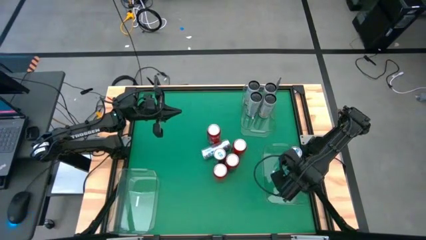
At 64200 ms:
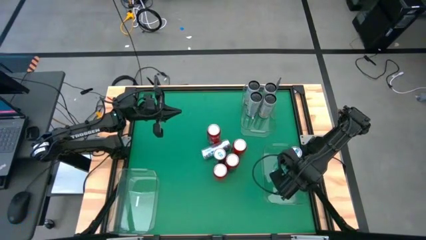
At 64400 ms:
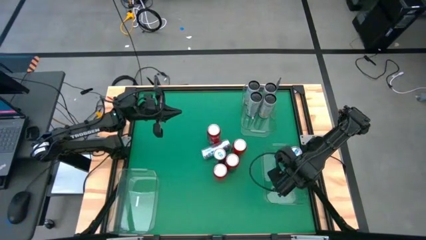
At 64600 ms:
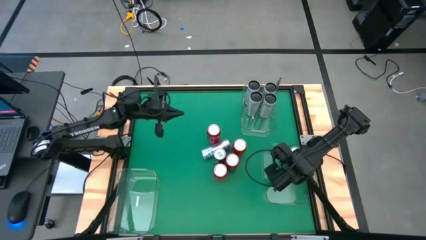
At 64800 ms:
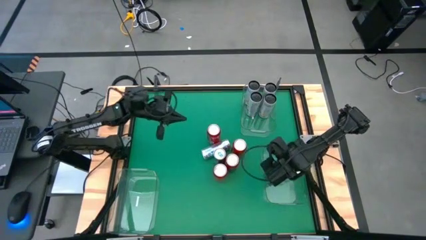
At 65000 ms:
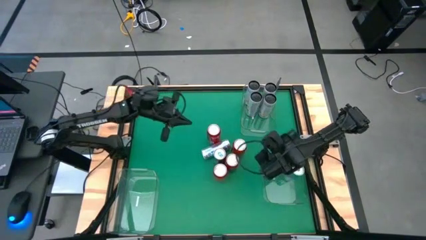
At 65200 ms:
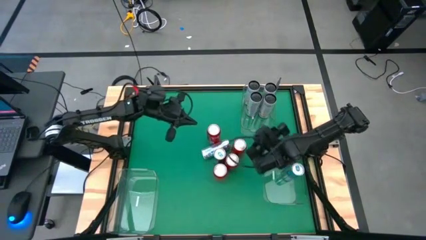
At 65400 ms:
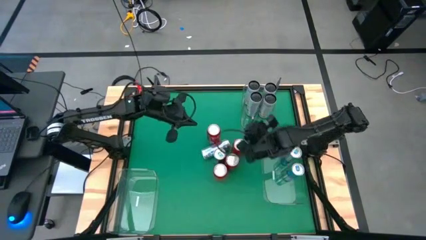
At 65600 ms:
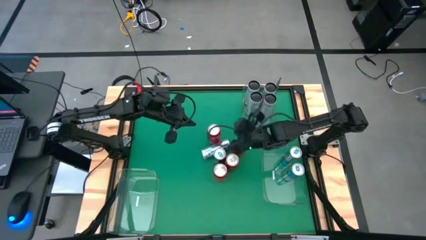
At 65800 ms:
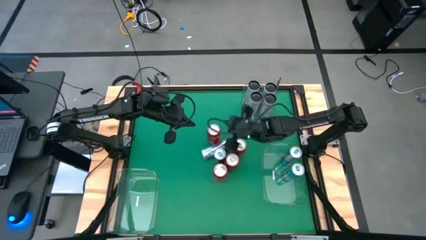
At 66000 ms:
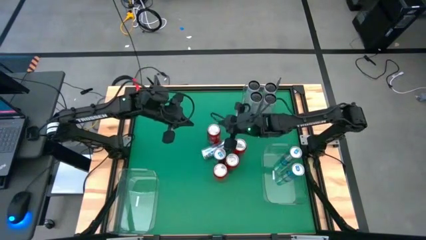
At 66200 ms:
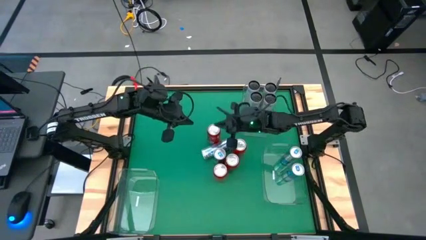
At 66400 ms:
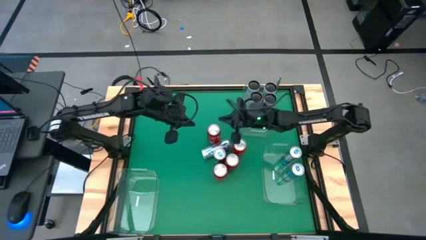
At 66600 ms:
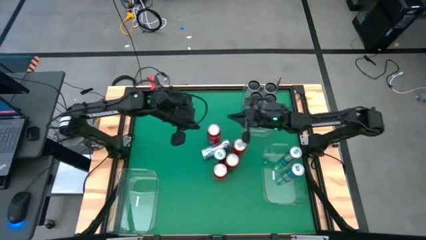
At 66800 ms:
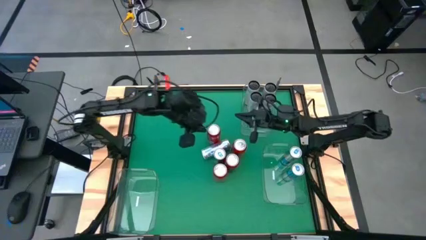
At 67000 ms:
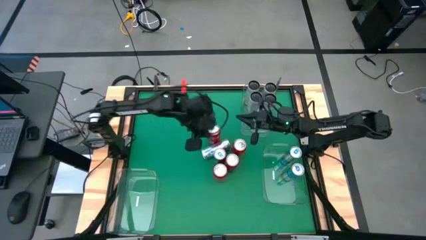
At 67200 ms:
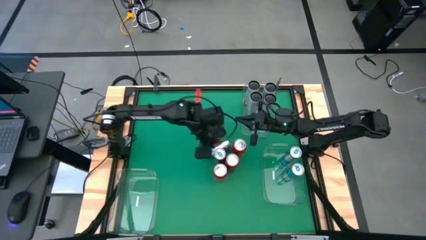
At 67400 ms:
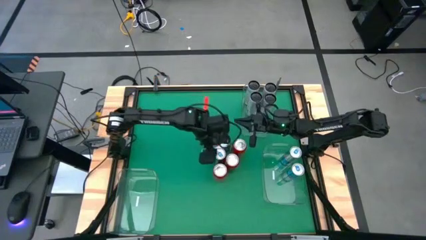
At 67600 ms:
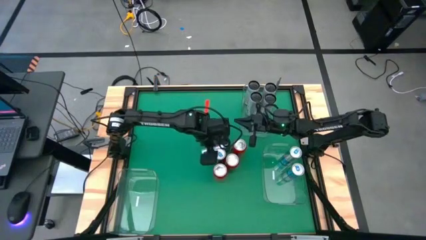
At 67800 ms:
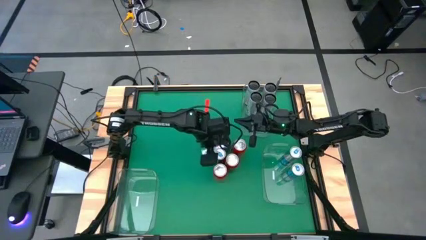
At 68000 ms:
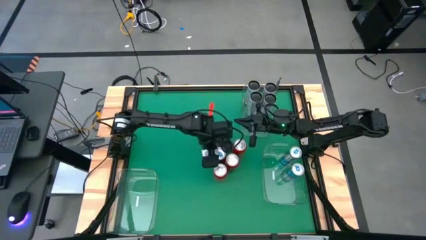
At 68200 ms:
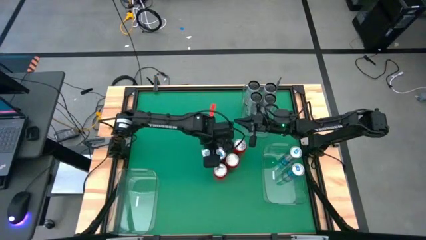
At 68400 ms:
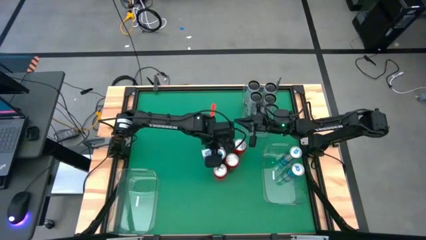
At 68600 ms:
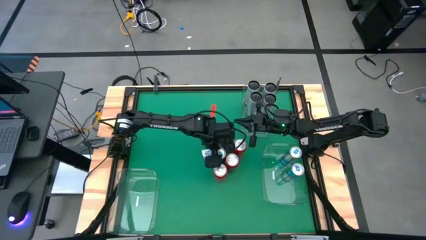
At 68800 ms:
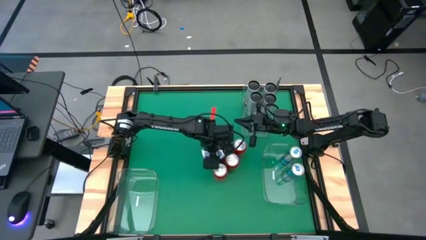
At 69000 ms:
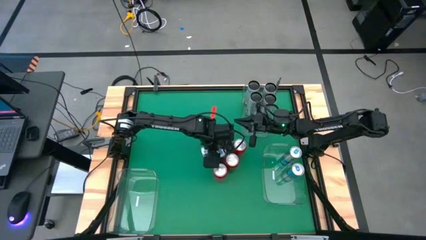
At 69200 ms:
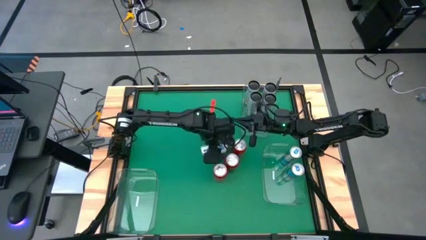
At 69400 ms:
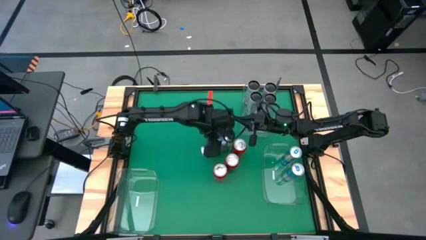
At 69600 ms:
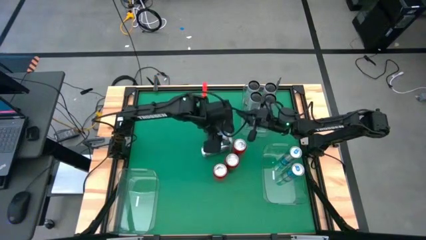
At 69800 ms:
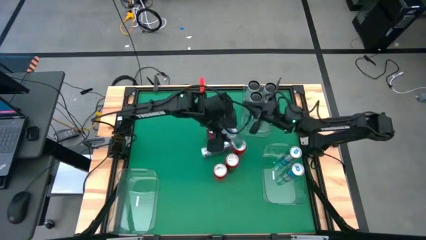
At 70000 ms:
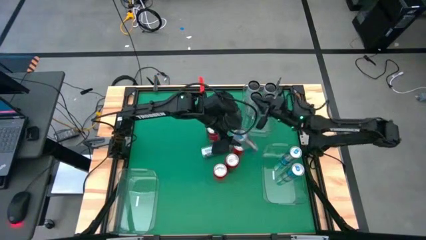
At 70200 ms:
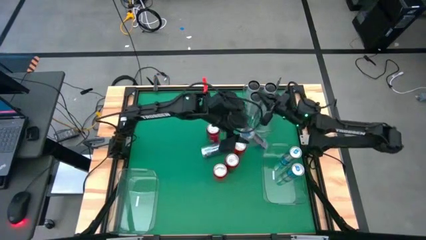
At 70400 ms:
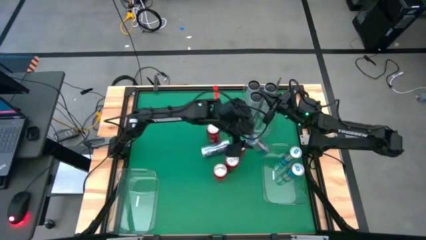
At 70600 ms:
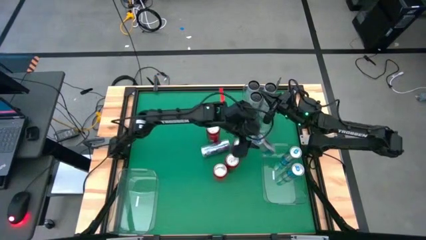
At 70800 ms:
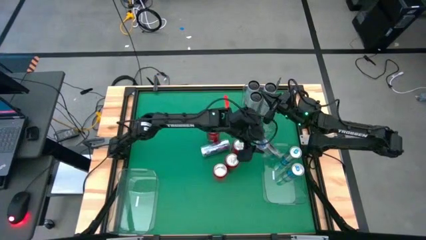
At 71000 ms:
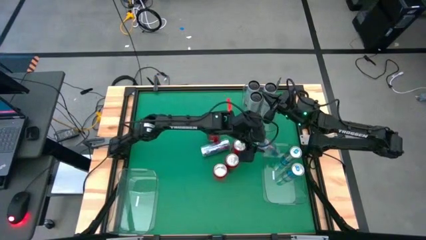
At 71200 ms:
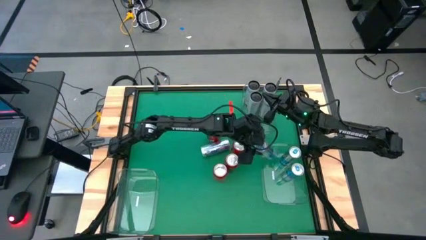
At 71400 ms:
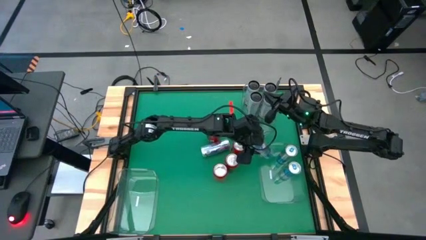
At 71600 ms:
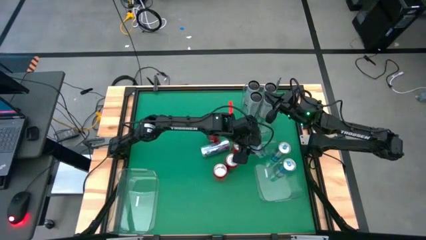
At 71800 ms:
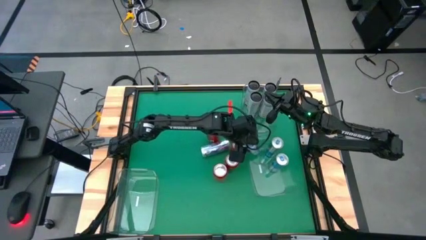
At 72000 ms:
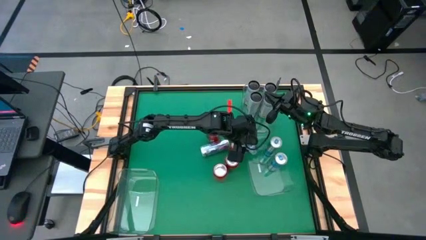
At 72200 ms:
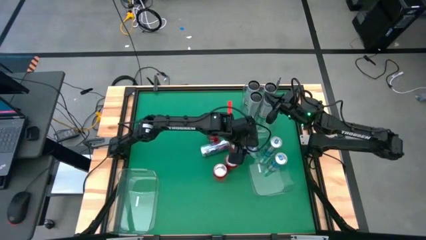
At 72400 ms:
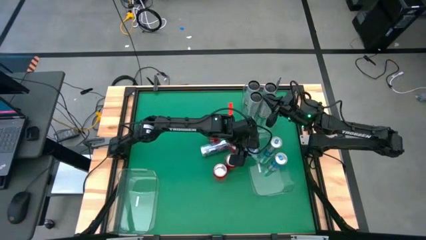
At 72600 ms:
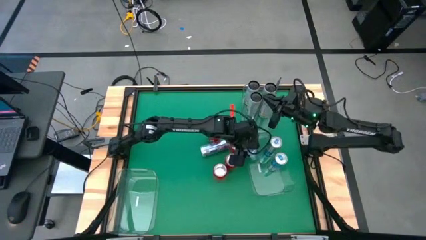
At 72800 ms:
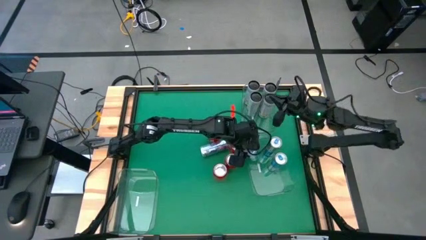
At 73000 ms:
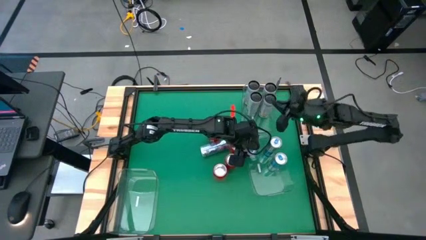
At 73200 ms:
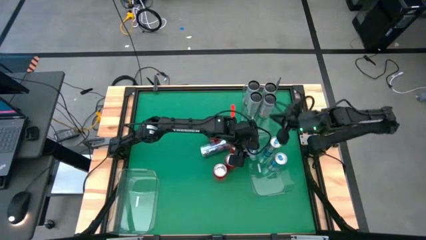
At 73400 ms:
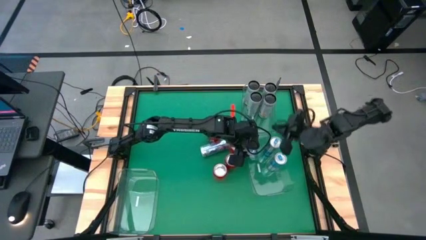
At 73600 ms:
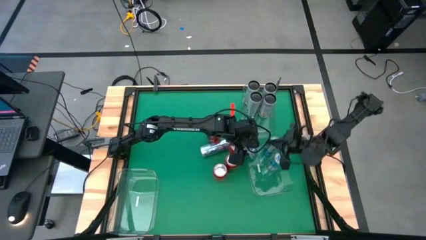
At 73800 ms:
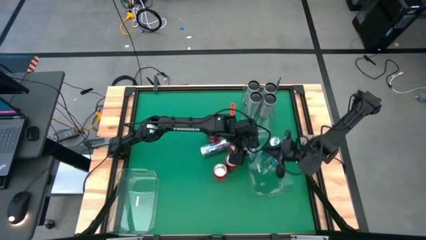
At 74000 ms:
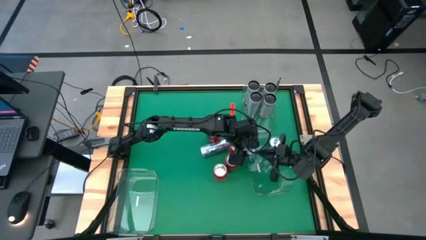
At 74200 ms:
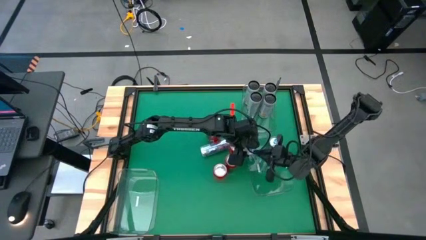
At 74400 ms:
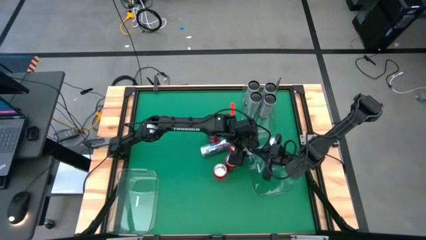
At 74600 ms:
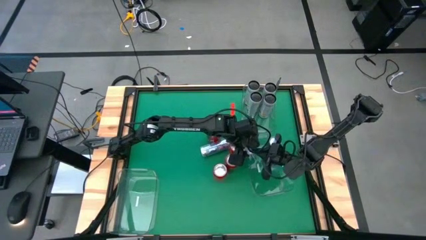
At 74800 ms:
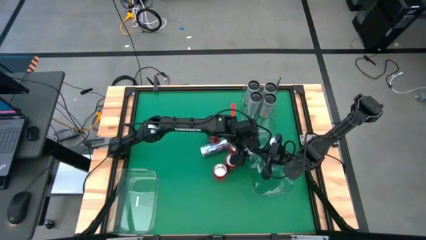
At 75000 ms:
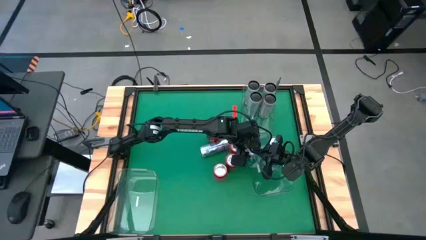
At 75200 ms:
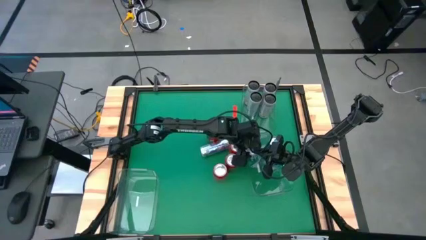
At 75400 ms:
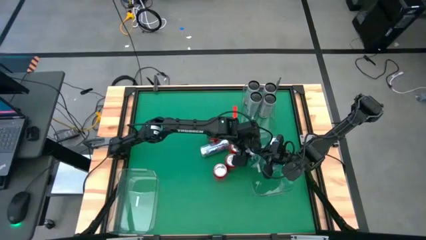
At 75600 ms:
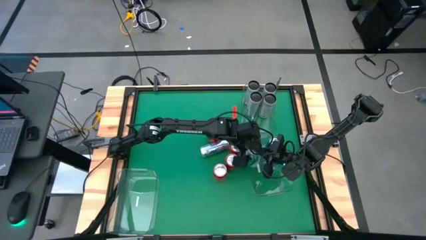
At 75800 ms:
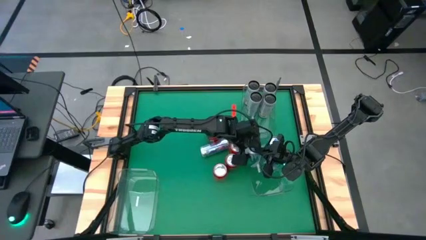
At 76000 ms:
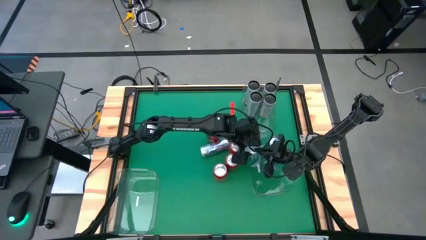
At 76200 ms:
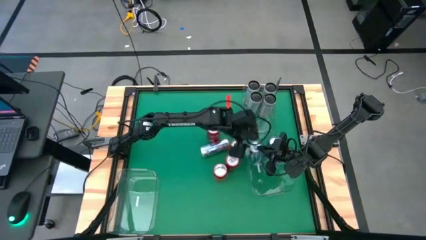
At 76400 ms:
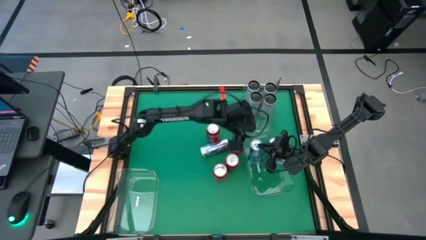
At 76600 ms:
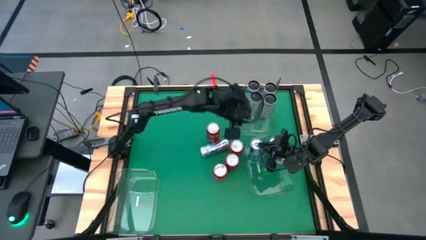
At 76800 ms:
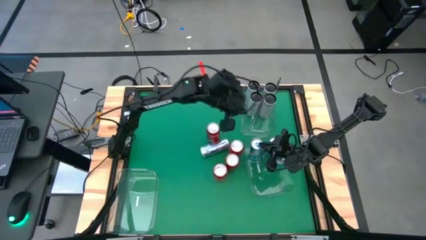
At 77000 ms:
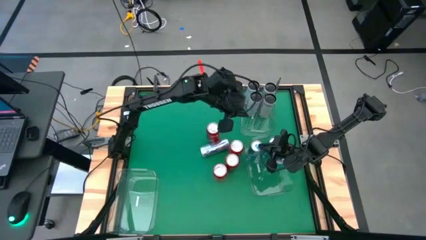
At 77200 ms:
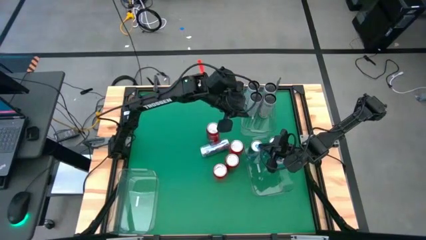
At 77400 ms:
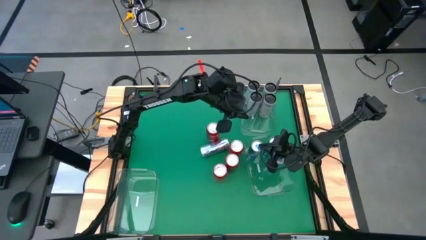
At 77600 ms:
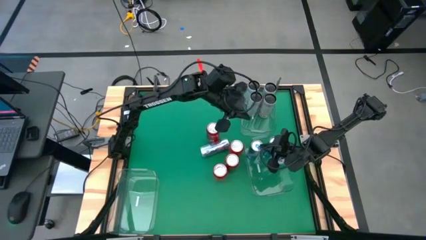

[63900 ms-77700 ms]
Task: Sort soda cans
Put the blue soda can into the bottom right transparent bin
